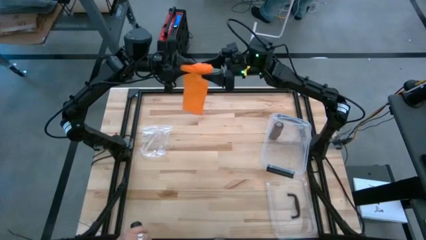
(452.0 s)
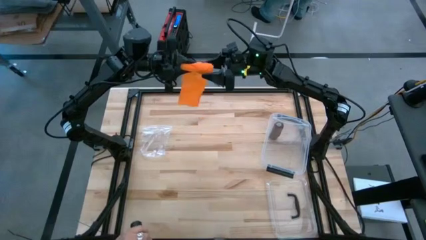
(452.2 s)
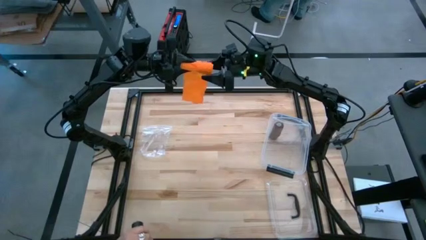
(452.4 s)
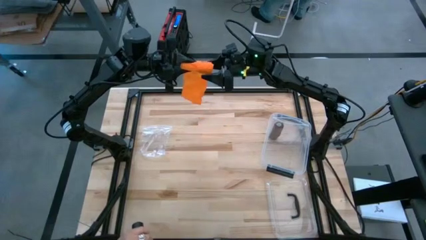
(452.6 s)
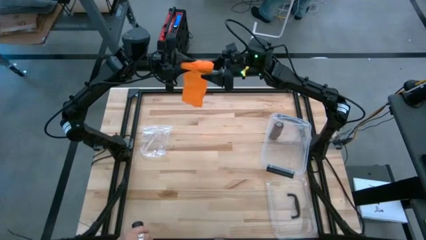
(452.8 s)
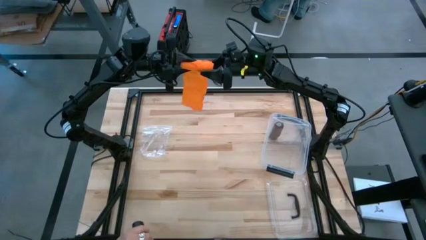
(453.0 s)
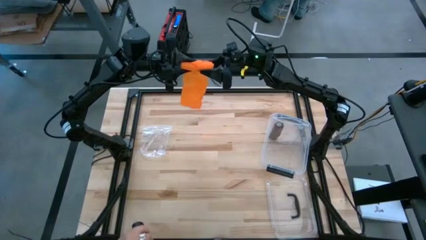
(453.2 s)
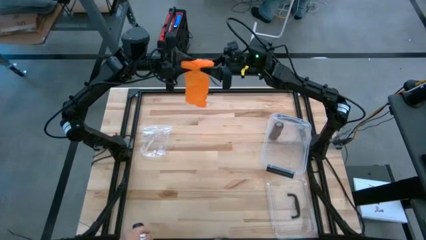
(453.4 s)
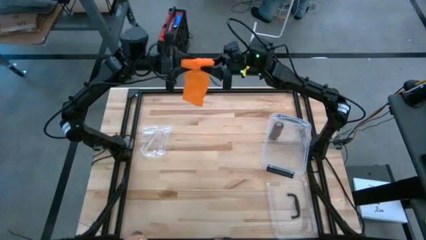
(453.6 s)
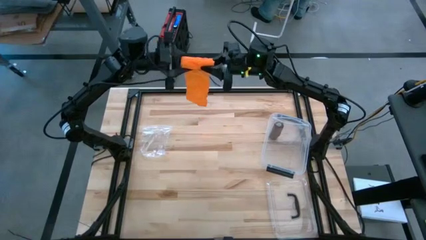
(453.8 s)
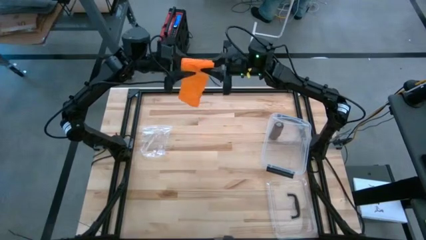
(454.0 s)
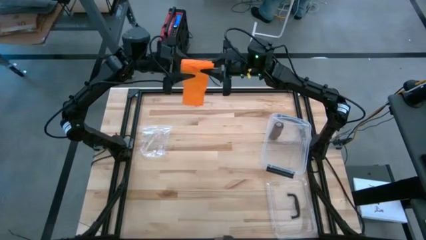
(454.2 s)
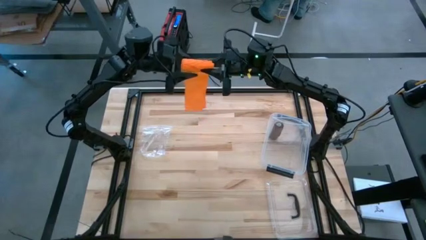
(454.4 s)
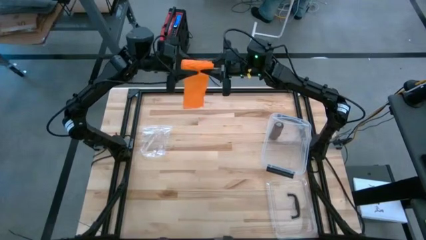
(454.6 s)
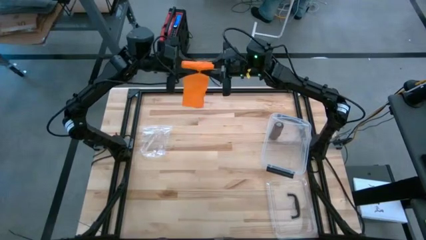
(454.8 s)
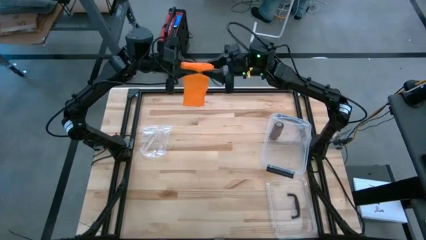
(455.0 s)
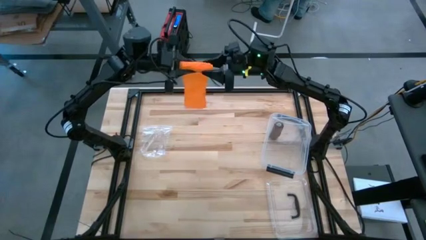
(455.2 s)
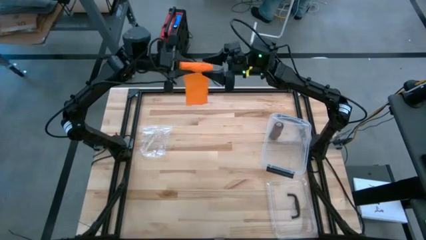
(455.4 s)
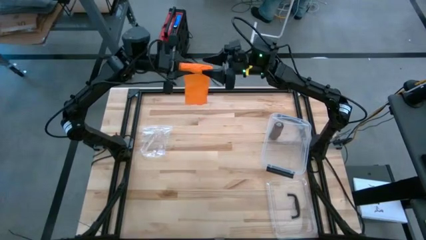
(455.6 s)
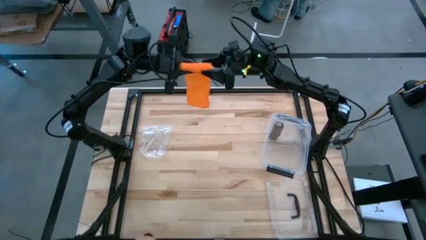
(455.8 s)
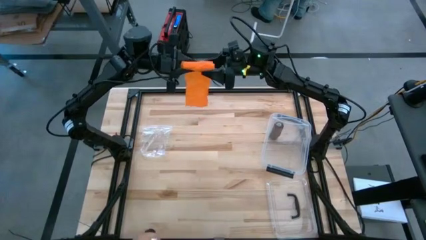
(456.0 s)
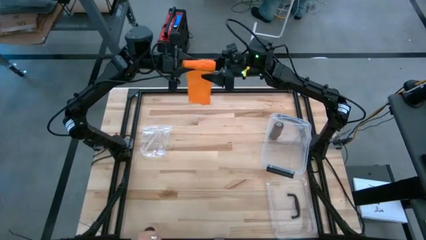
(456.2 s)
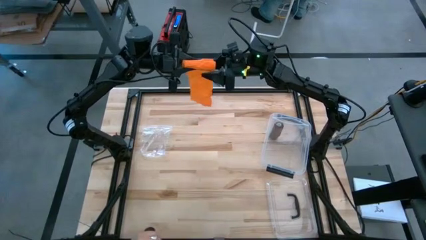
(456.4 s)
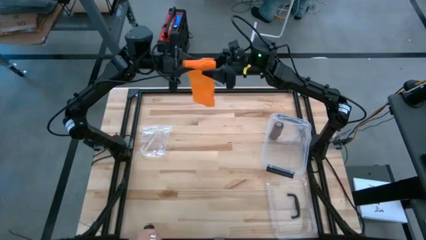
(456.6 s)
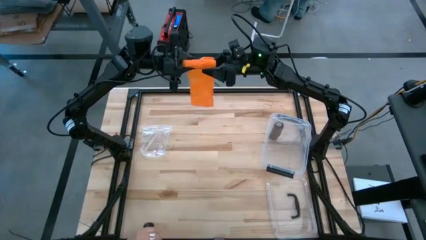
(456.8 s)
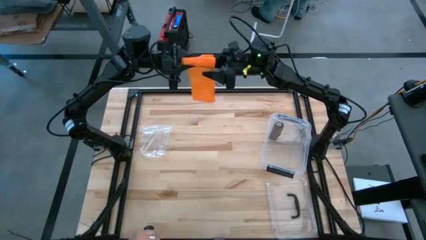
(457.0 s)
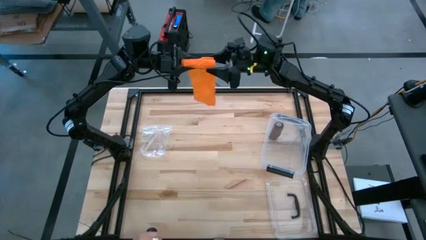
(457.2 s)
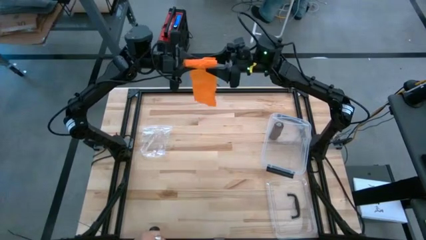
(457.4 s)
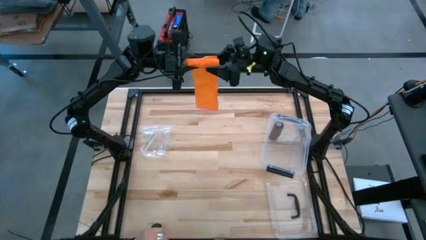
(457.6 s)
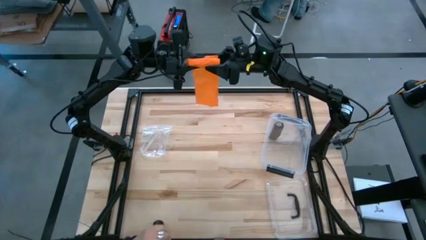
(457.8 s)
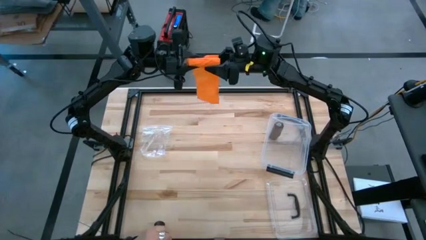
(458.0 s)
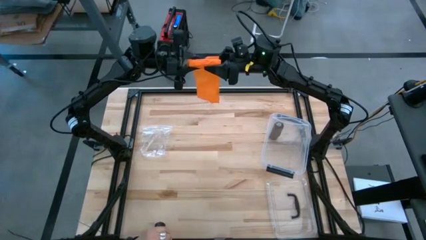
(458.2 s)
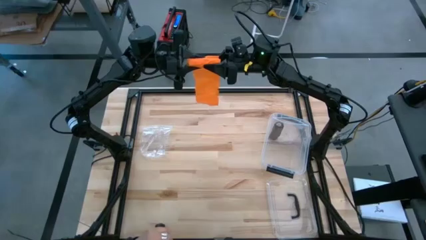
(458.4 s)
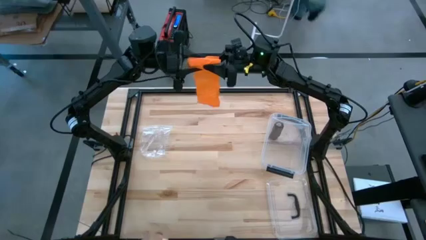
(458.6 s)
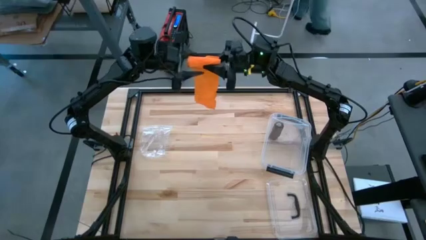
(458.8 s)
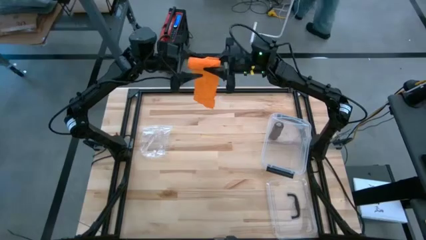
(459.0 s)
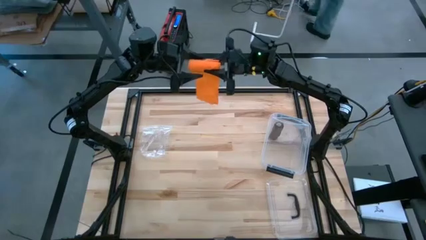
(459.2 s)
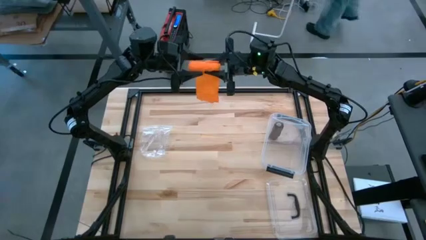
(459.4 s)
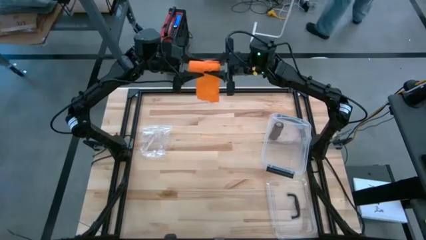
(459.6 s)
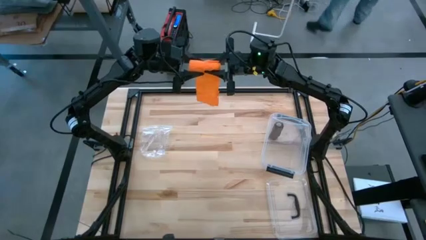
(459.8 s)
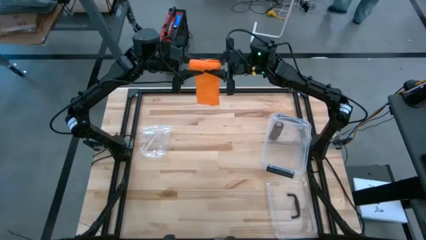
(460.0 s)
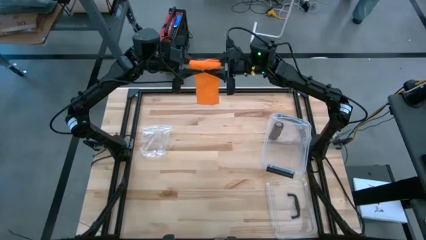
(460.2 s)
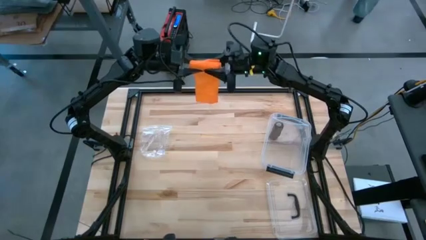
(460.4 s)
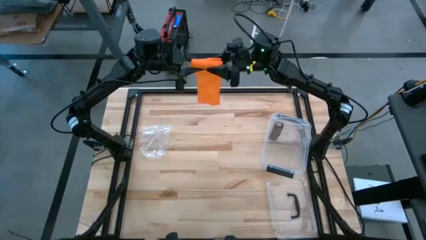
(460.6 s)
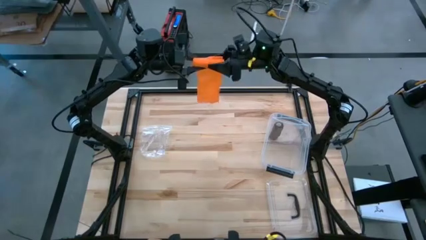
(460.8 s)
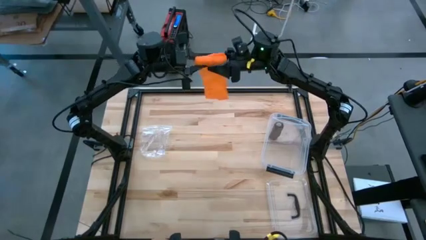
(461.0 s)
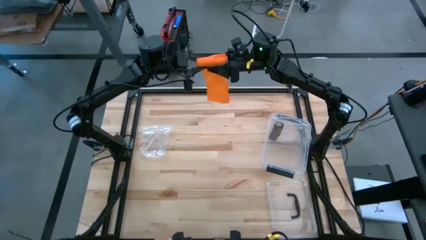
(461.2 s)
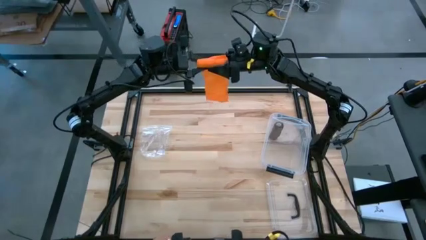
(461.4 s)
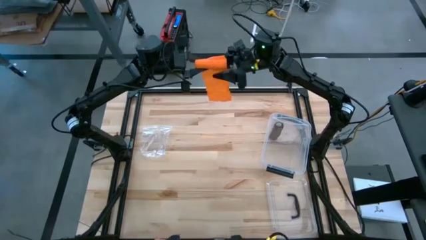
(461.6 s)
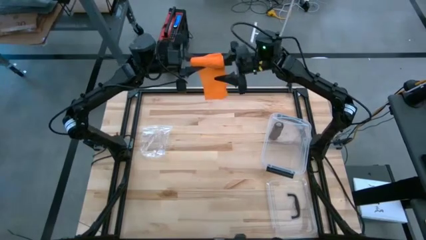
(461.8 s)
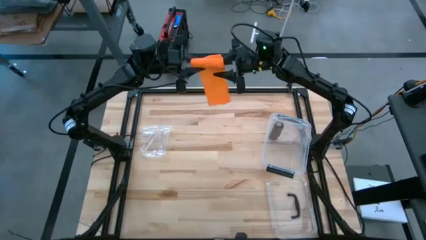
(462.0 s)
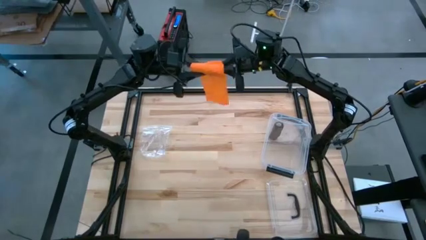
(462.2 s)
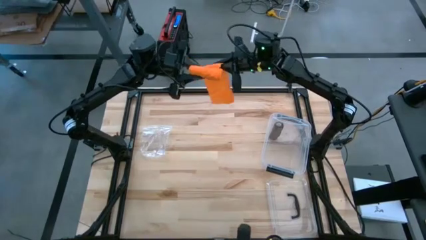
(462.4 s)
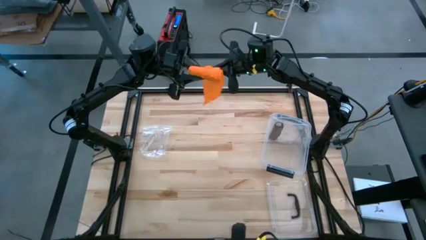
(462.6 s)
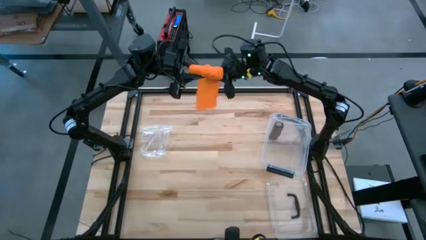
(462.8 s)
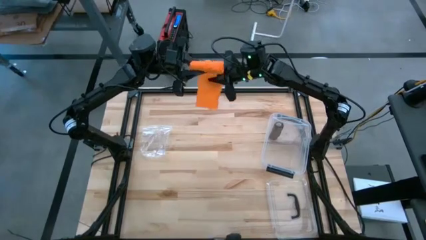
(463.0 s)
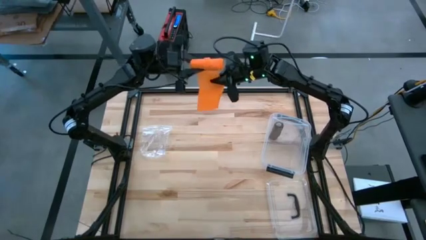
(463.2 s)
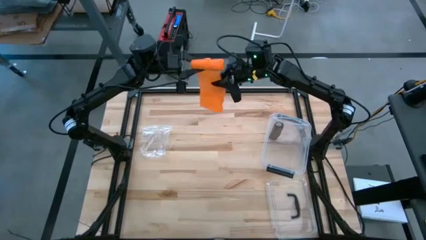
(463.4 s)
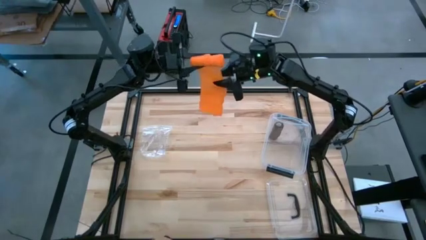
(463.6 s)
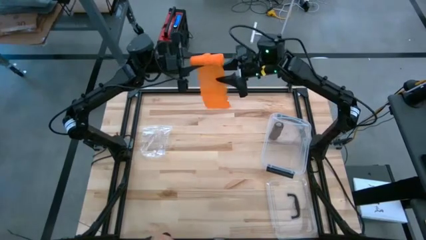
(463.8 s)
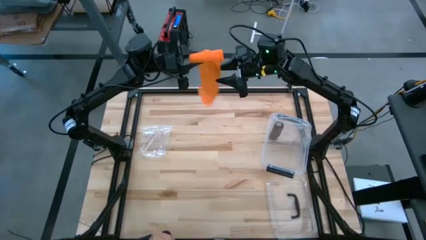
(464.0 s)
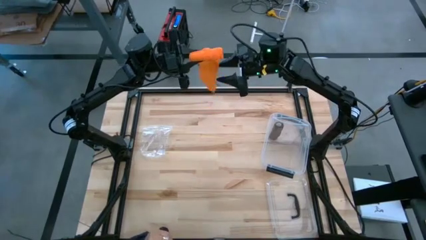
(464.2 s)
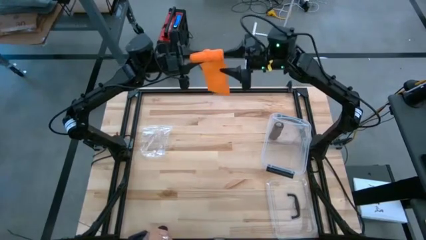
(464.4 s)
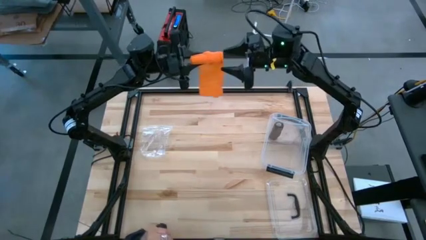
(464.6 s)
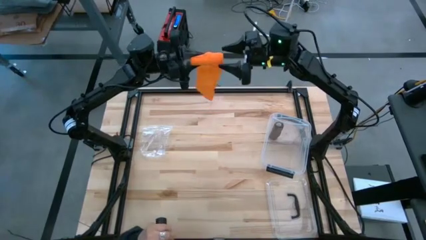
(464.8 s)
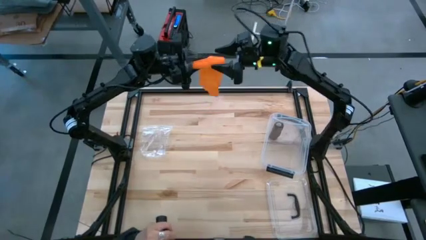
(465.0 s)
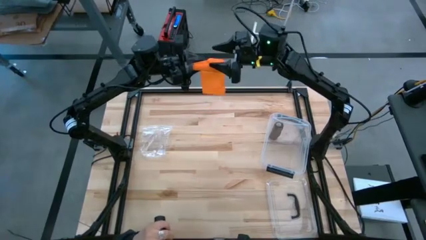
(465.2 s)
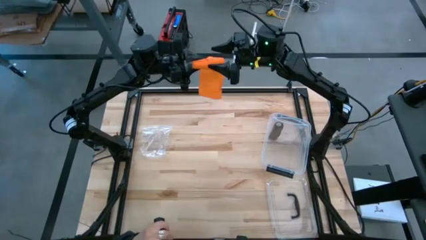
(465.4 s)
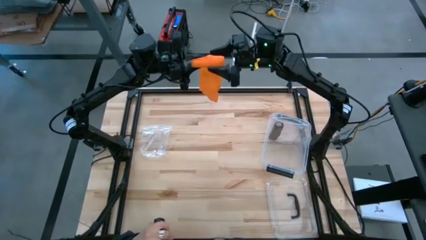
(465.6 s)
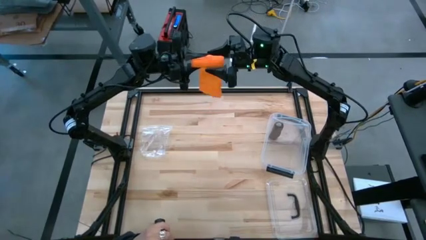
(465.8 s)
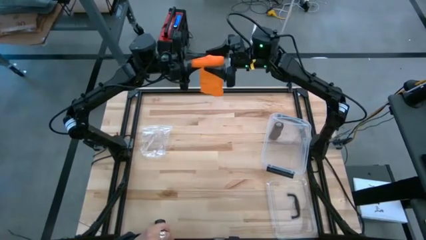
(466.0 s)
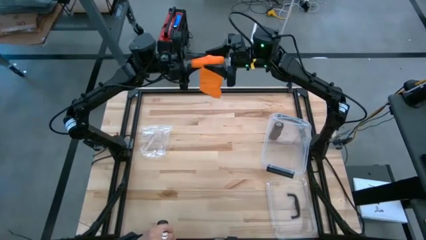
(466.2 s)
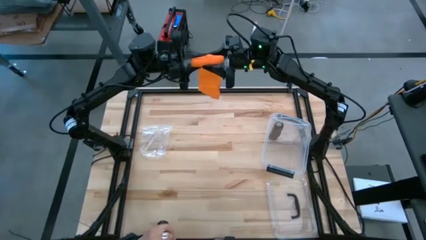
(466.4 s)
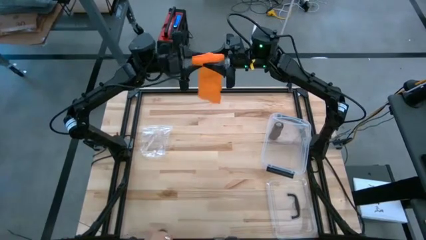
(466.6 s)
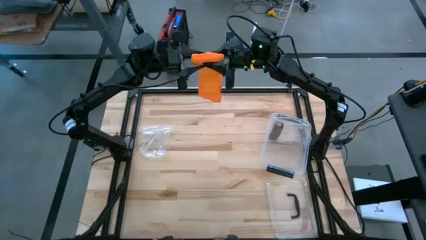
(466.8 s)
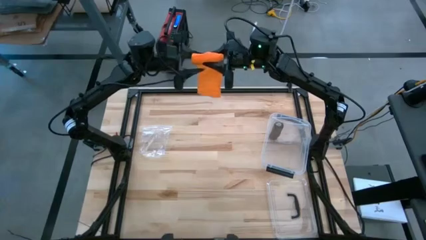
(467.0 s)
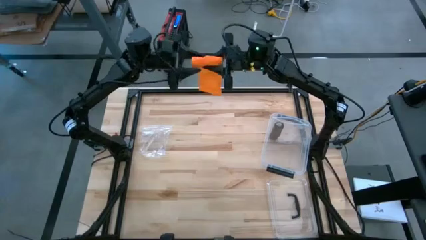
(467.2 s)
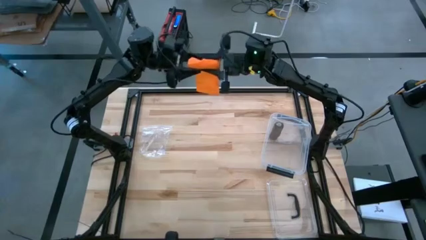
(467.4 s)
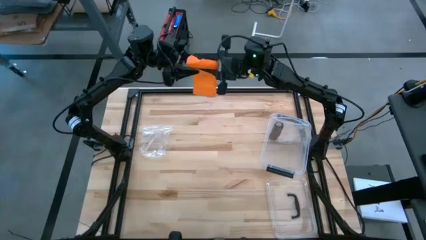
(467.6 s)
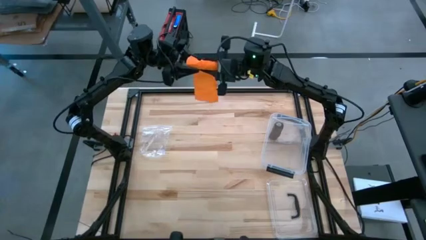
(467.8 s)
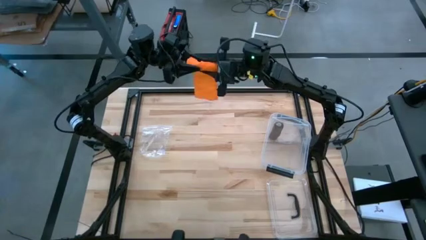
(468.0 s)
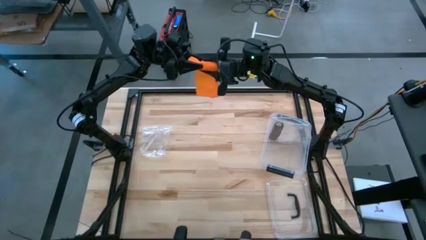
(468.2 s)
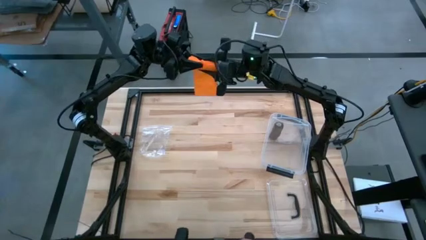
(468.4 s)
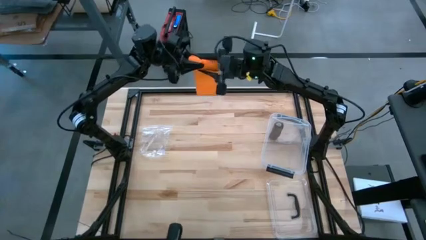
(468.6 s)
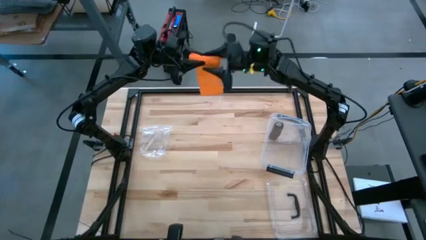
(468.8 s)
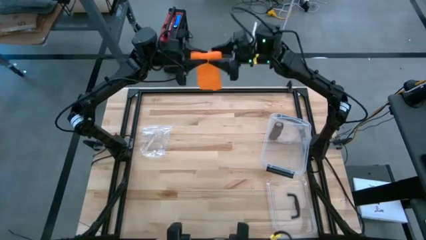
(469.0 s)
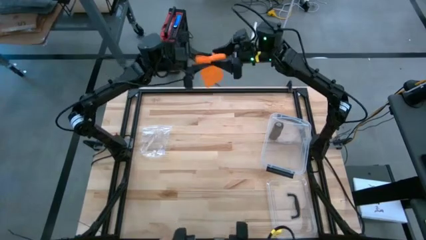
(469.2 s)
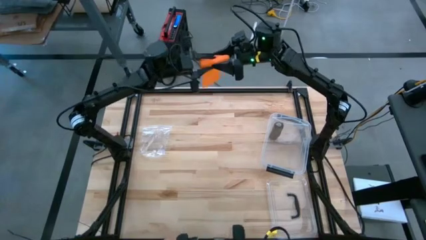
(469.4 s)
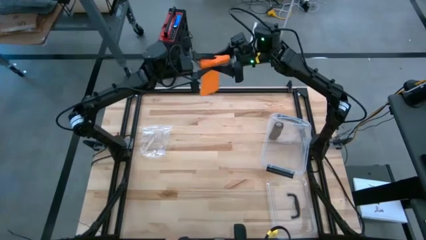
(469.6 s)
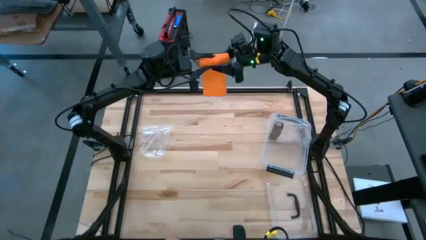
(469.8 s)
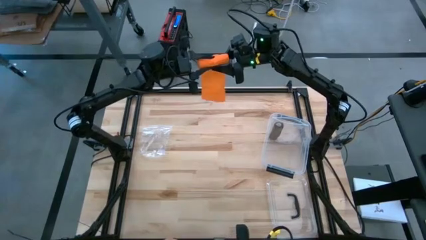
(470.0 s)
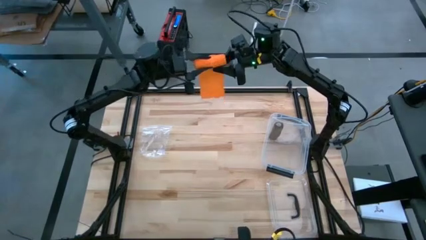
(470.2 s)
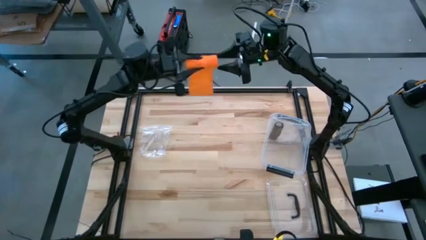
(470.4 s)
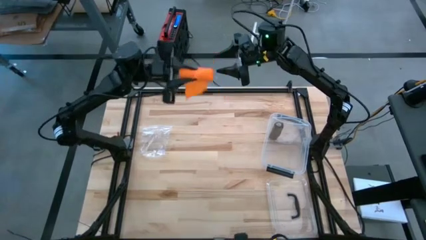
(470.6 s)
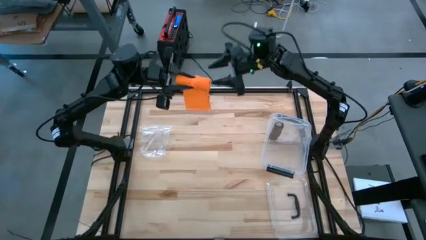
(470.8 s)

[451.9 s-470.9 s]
Task: Roll bandage
Roll the orange bandage
